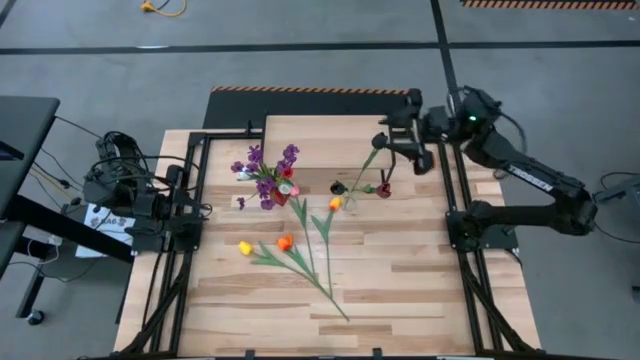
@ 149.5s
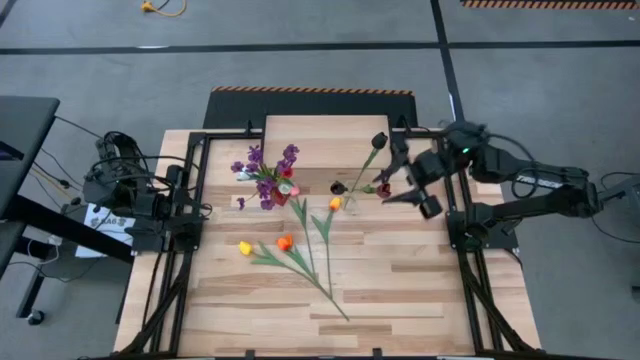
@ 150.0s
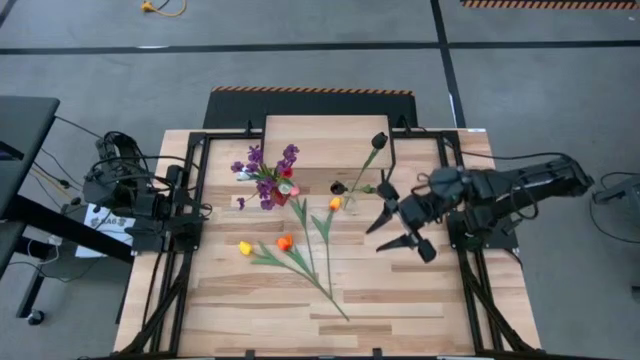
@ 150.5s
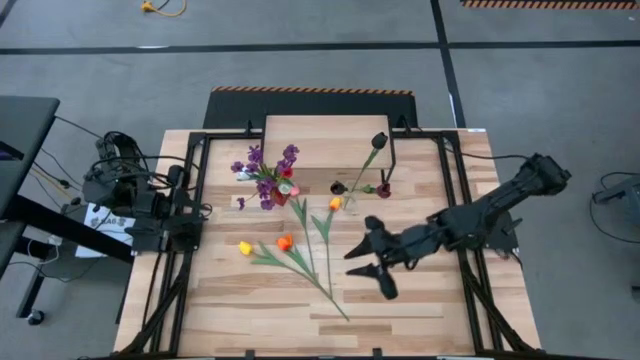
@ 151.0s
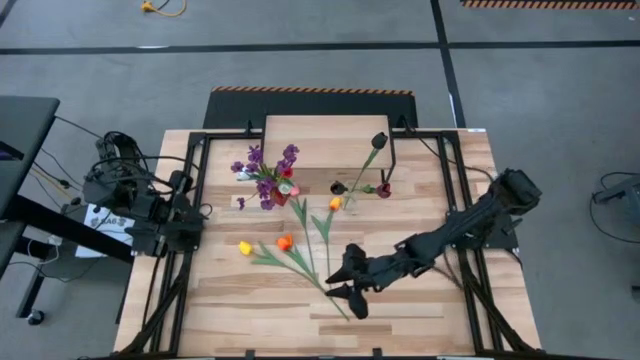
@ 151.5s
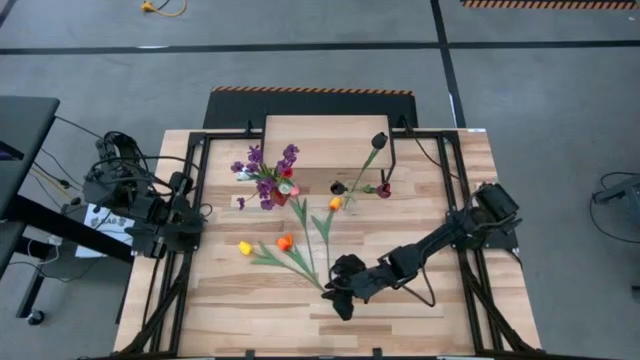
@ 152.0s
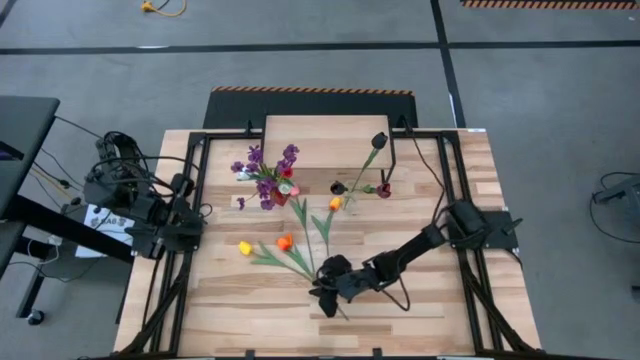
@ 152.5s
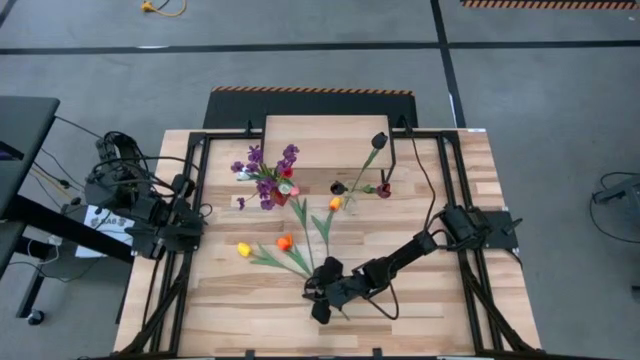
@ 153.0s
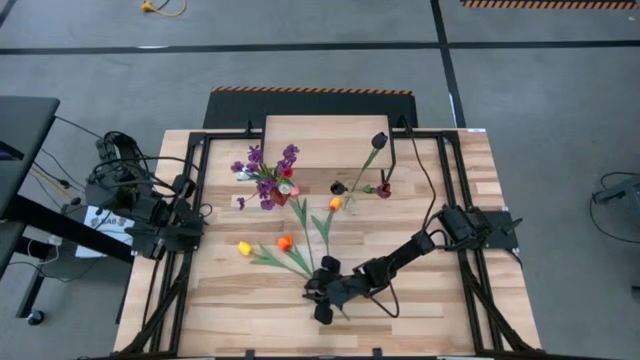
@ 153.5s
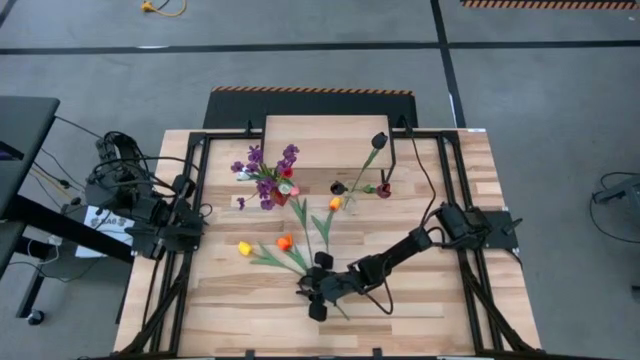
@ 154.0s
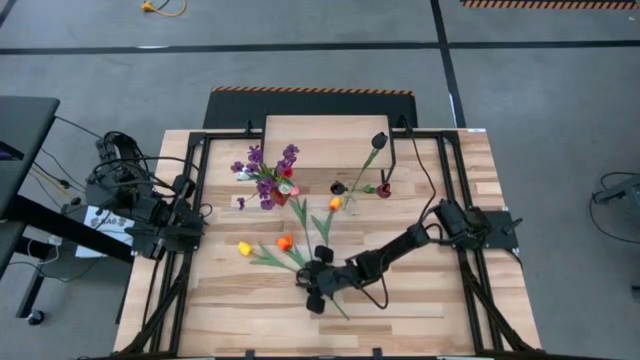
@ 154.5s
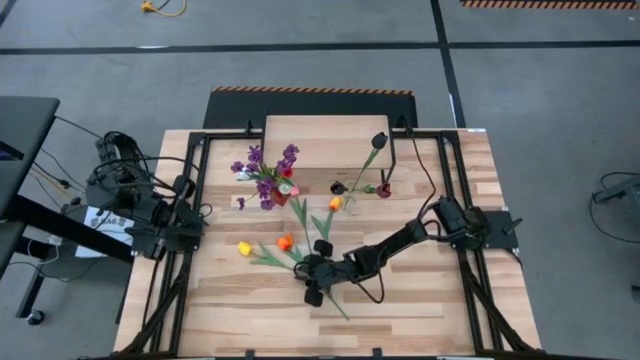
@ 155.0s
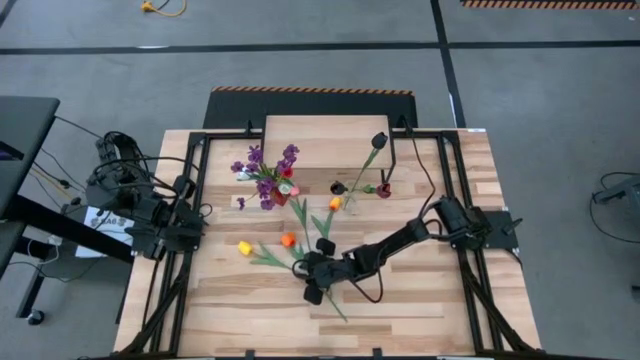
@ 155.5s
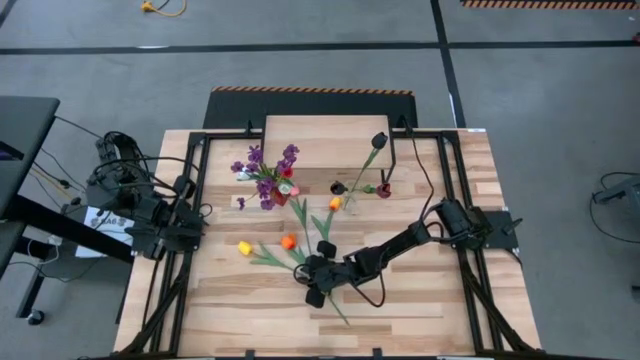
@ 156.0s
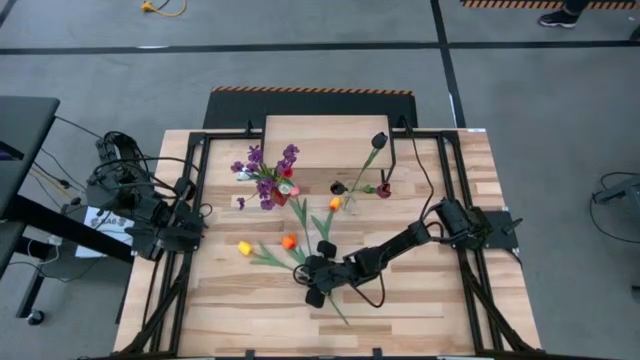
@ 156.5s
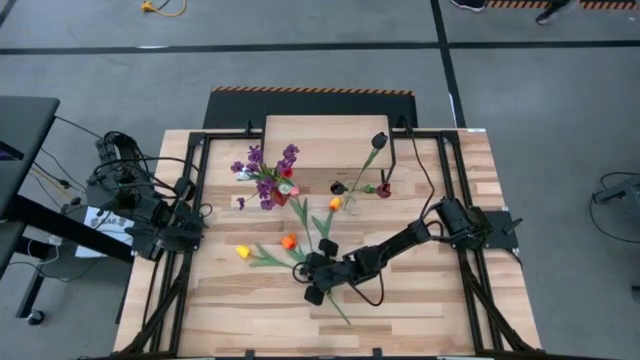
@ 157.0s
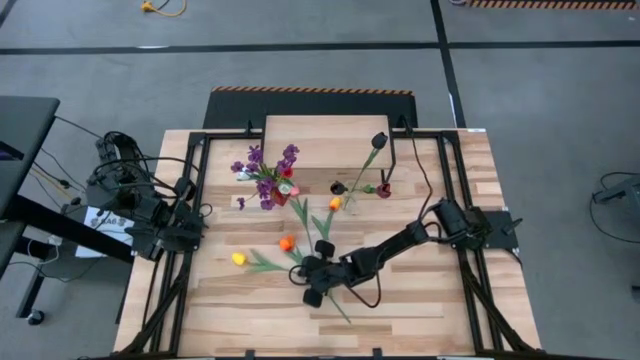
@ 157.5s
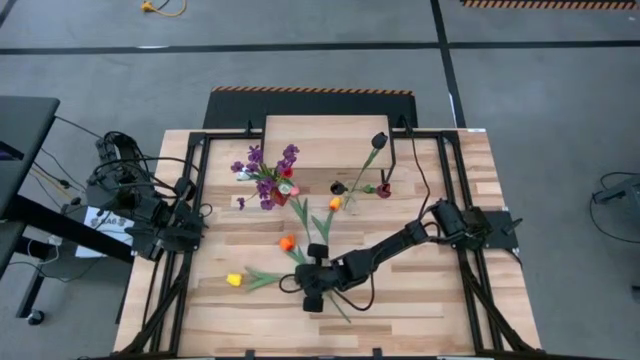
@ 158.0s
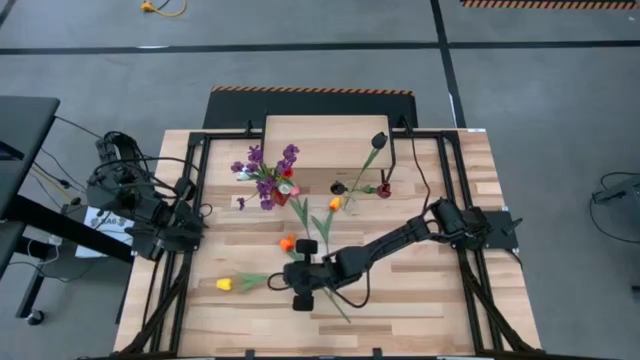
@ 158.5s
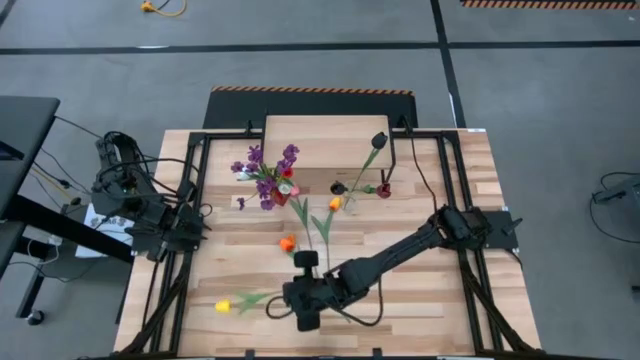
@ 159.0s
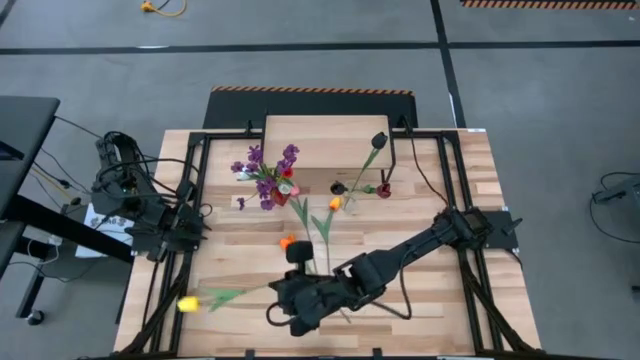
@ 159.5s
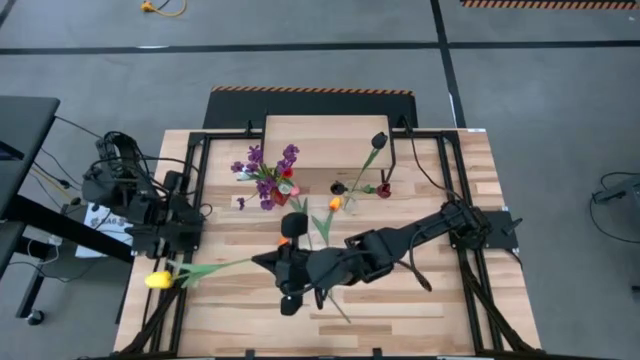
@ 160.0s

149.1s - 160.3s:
Task: Pick and place flowers into a vace then onto a shelf
Put the yellow flower into the transparent flower vase

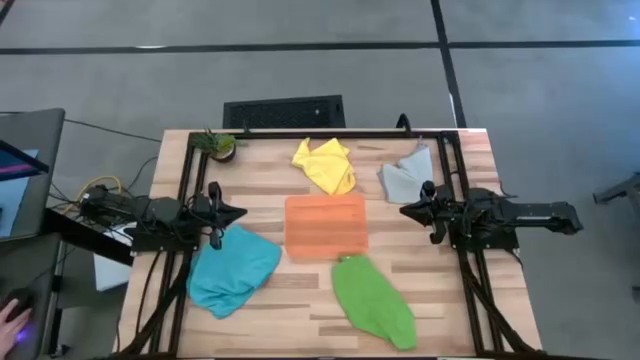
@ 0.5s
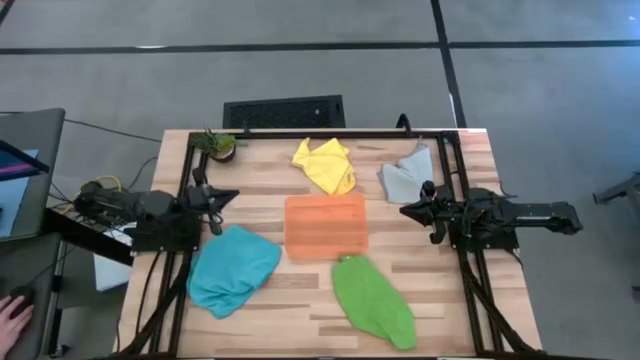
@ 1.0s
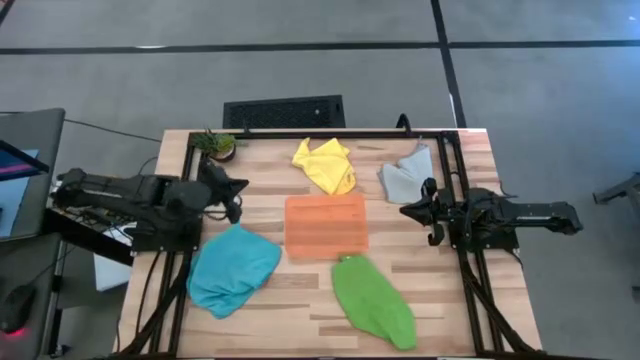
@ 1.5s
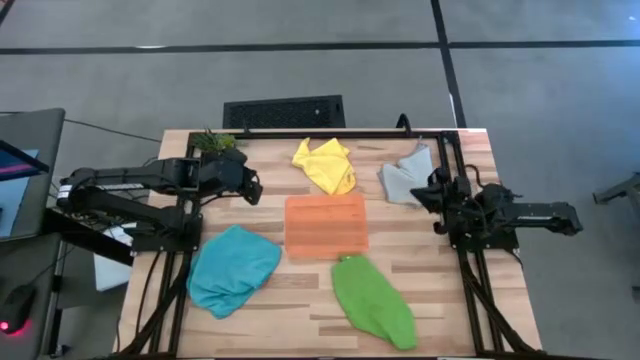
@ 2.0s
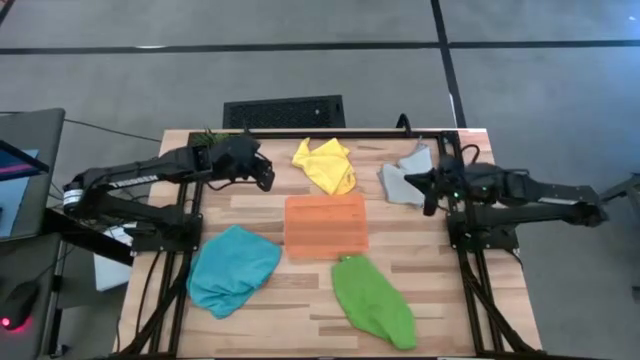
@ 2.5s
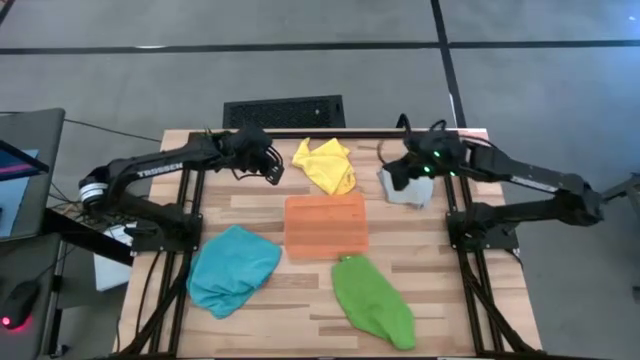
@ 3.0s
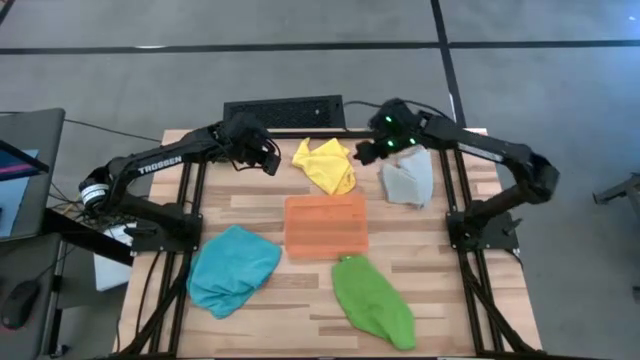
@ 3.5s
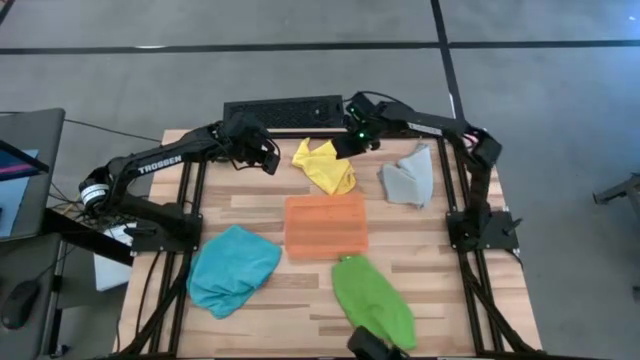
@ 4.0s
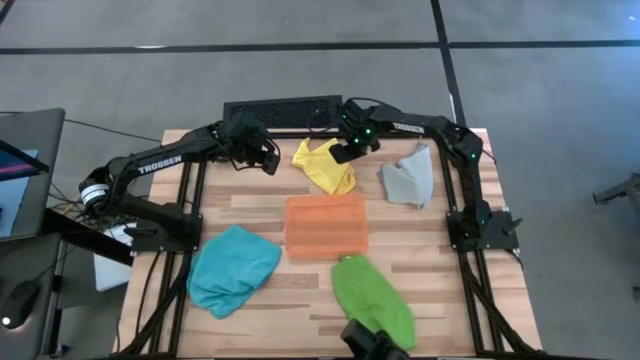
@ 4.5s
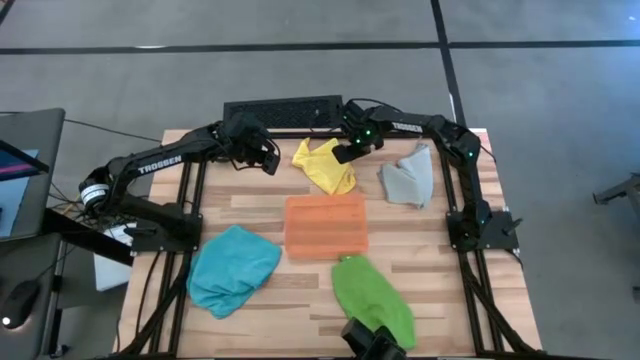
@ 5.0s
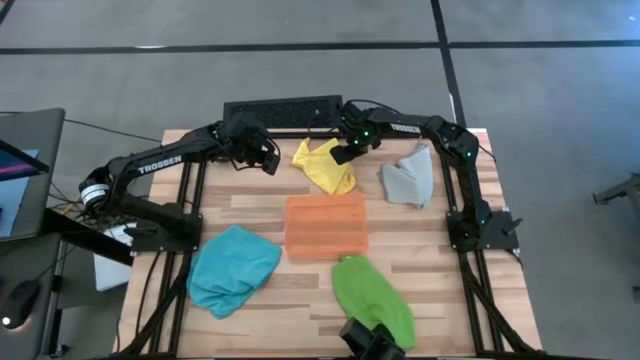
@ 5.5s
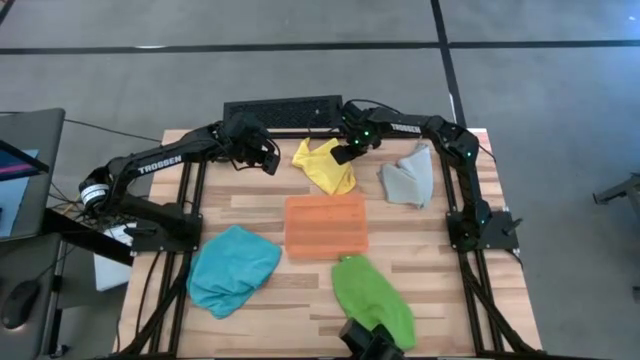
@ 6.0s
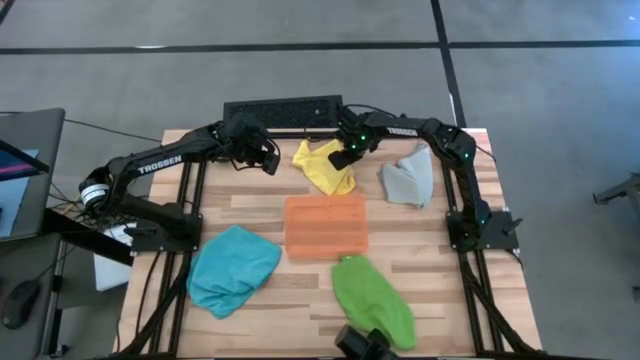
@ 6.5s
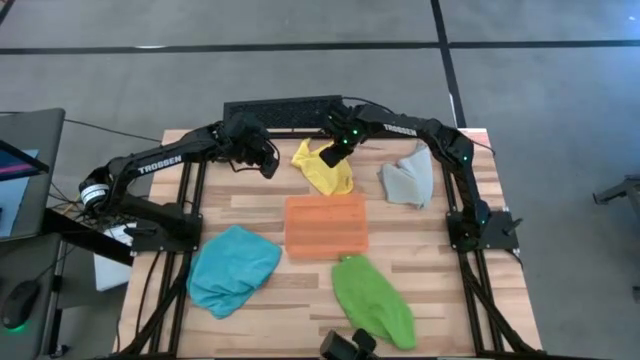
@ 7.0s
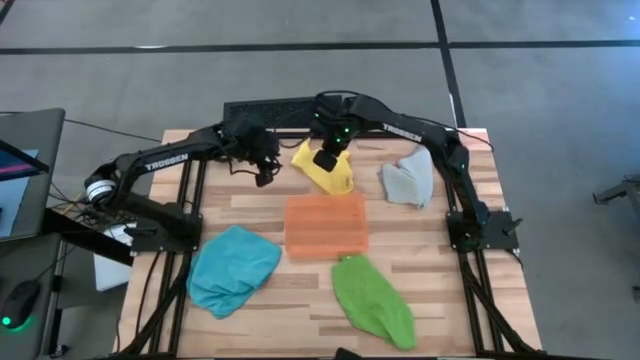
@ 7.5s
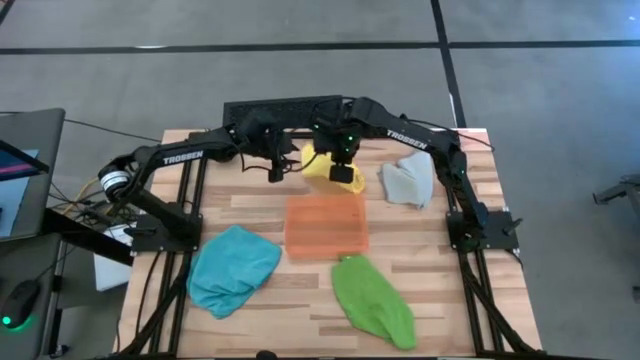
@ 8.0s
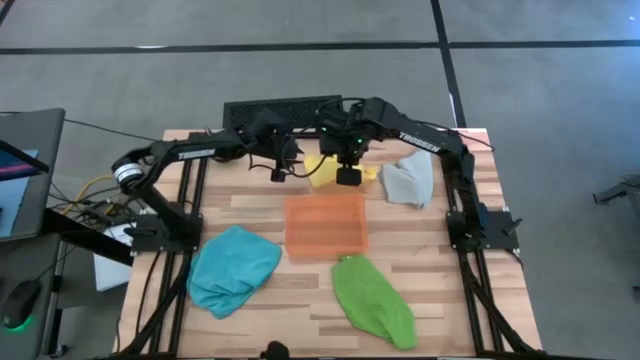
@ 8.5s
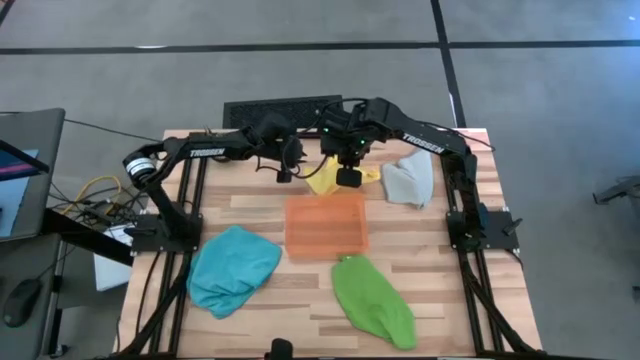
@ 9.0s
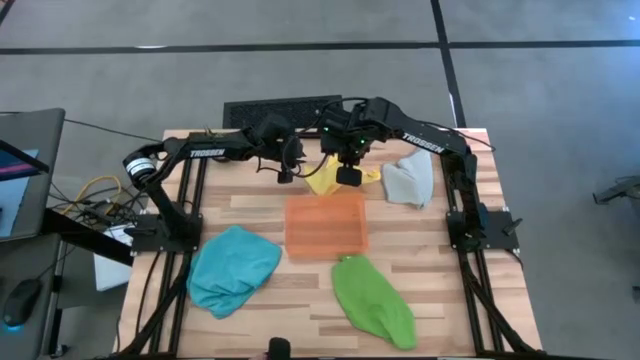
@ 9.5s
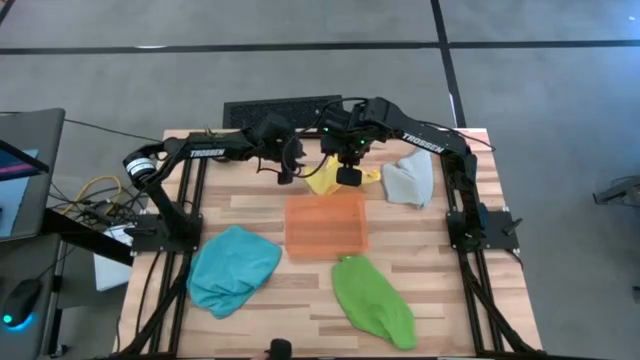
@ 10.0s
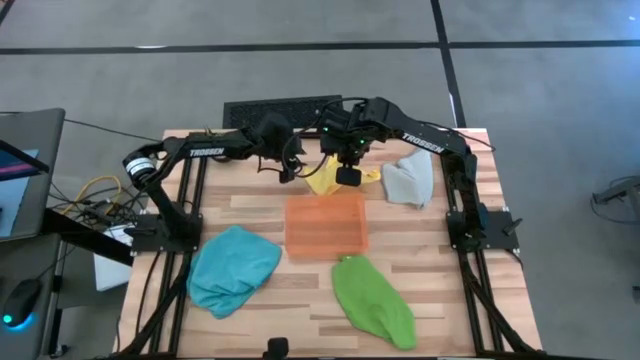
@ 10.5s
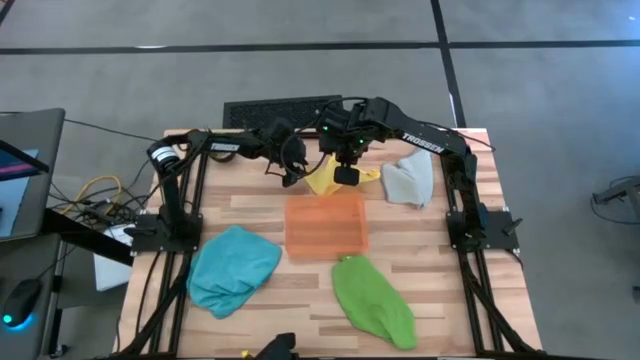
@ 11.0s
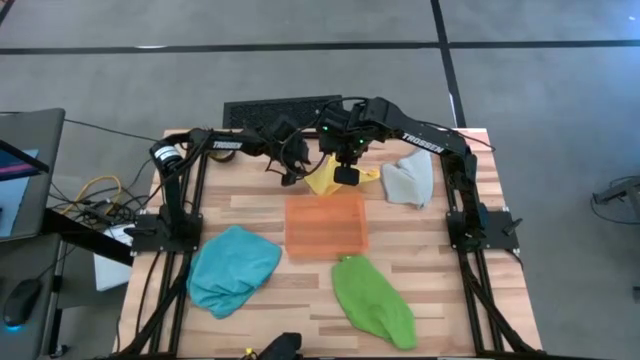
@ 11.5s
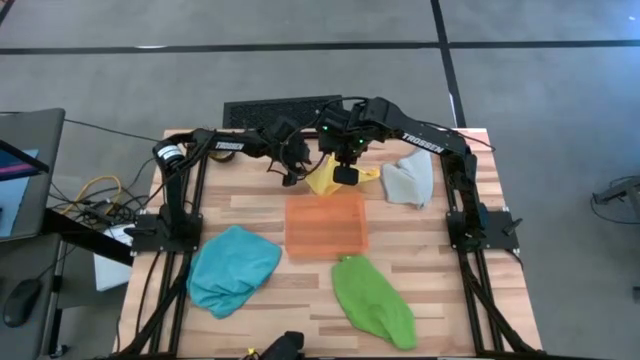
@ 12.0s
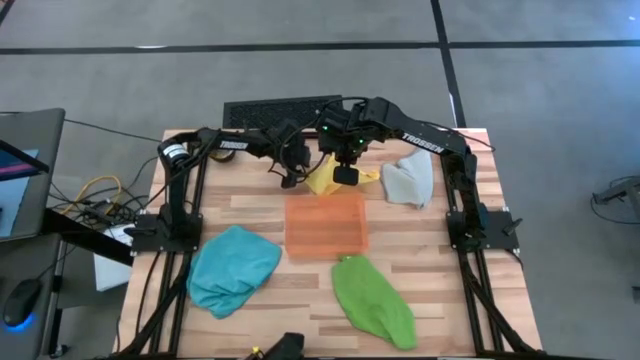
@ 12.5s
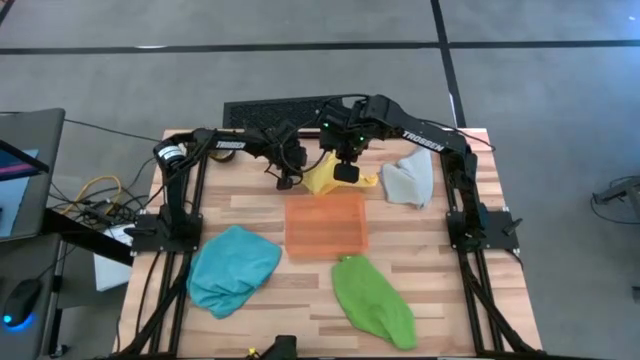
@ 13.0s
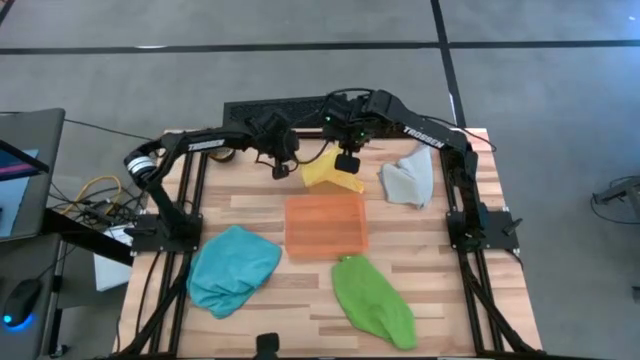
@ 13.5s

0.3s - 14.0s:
Task: Sort microfiber towel by color & place in baskets
Fold the yellow towel
